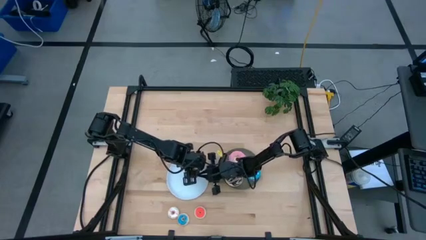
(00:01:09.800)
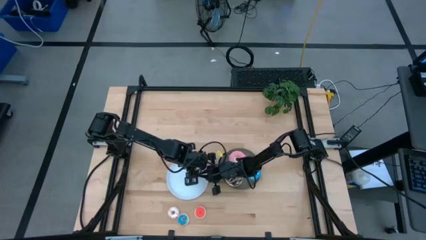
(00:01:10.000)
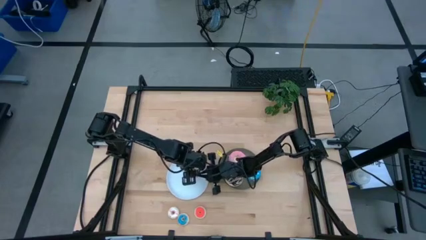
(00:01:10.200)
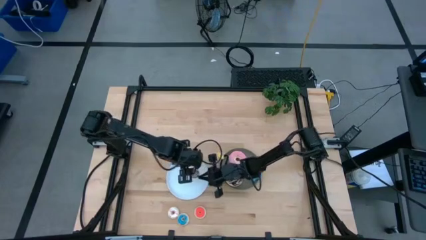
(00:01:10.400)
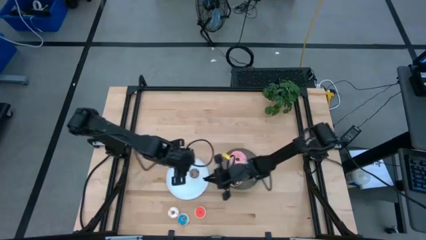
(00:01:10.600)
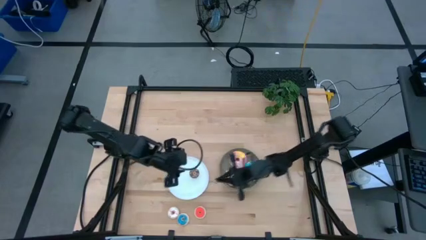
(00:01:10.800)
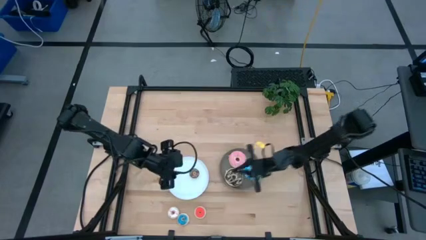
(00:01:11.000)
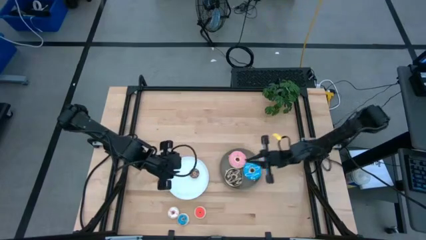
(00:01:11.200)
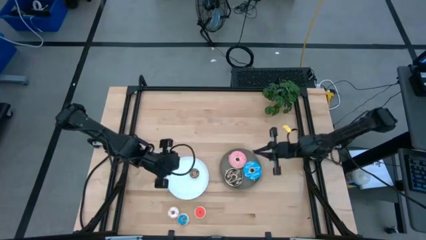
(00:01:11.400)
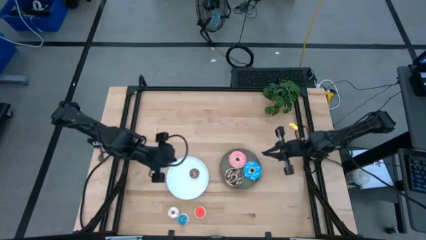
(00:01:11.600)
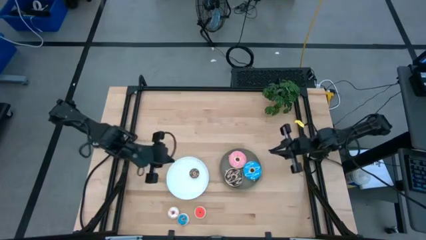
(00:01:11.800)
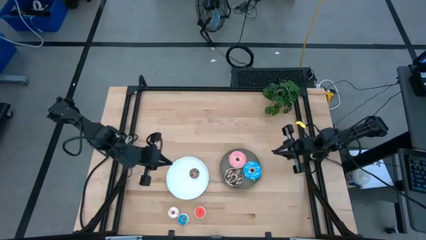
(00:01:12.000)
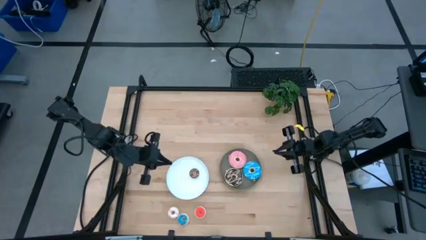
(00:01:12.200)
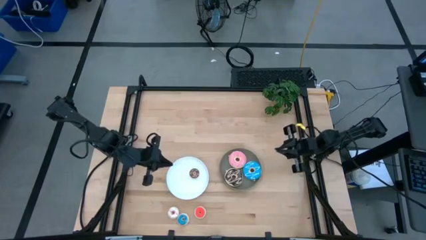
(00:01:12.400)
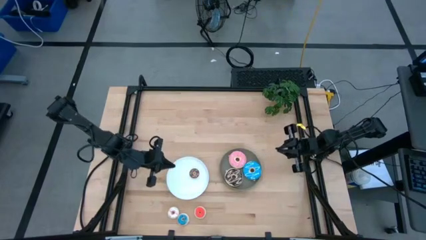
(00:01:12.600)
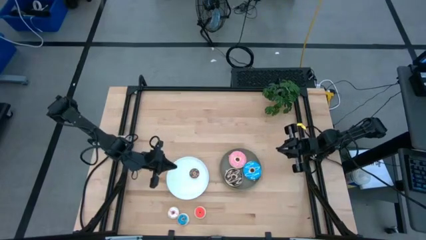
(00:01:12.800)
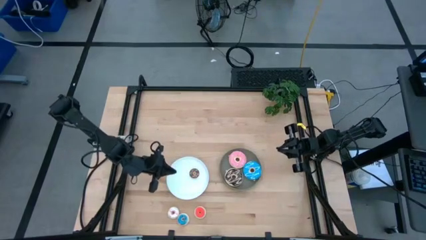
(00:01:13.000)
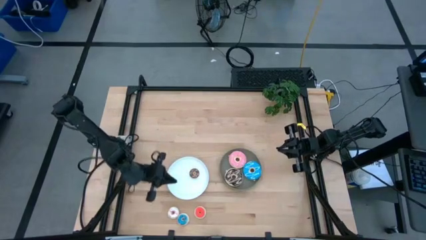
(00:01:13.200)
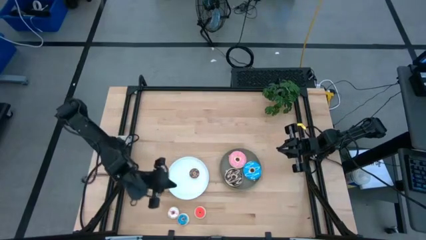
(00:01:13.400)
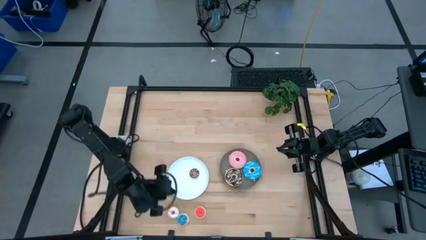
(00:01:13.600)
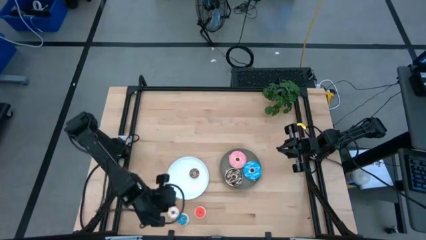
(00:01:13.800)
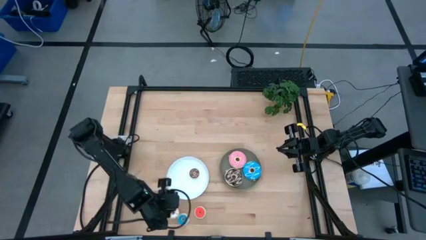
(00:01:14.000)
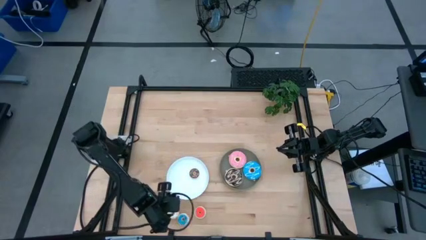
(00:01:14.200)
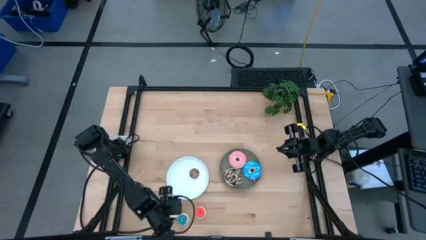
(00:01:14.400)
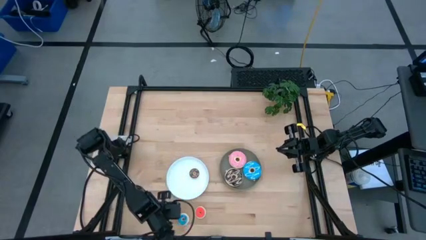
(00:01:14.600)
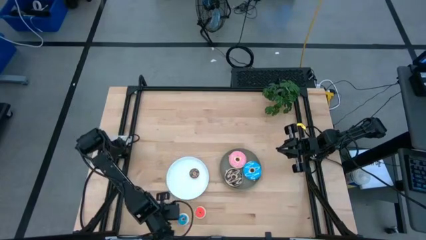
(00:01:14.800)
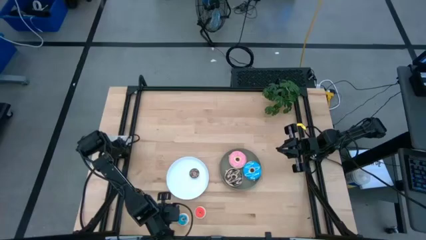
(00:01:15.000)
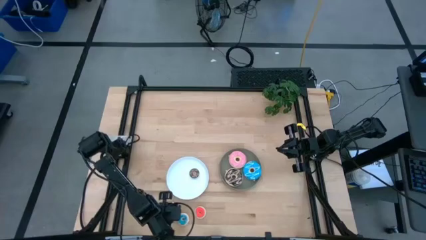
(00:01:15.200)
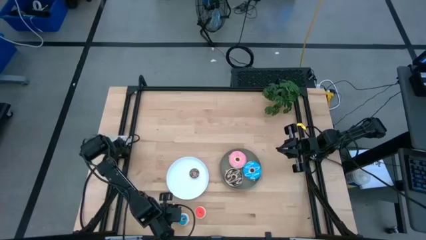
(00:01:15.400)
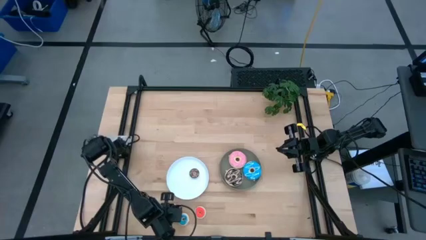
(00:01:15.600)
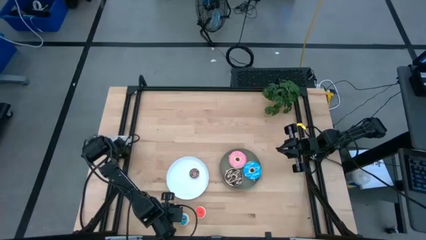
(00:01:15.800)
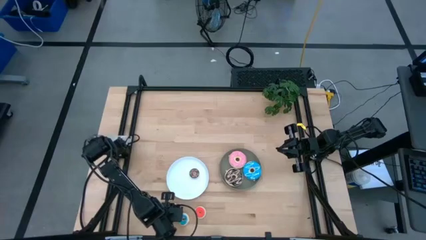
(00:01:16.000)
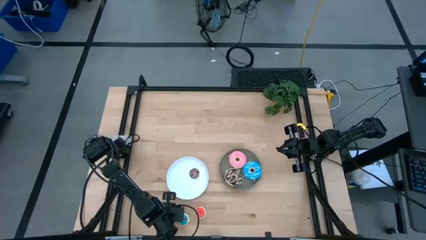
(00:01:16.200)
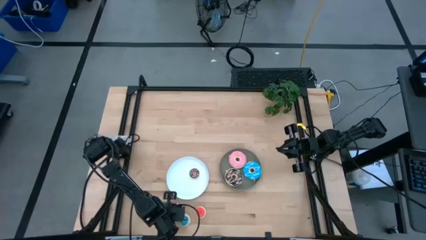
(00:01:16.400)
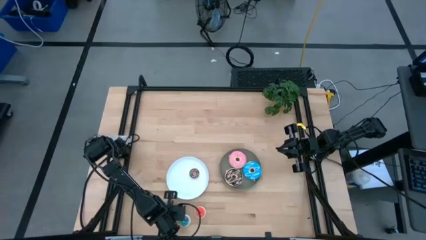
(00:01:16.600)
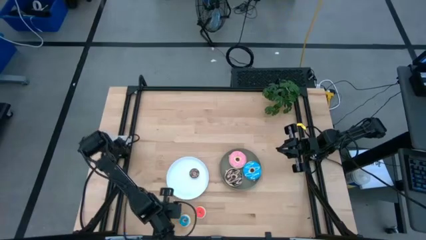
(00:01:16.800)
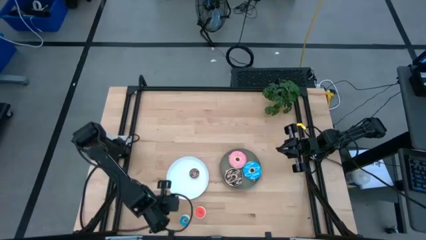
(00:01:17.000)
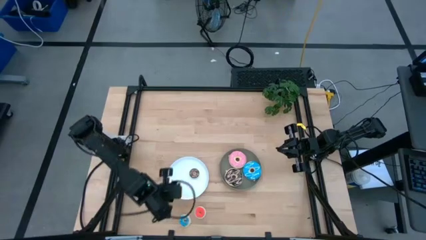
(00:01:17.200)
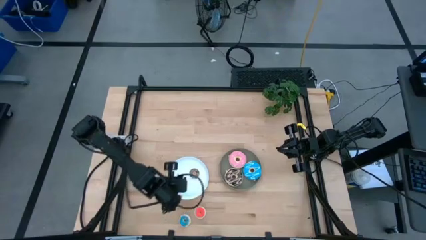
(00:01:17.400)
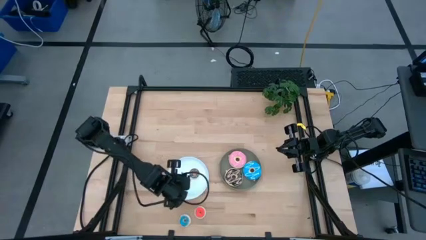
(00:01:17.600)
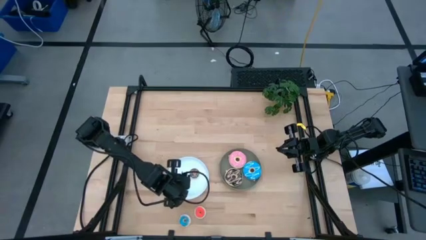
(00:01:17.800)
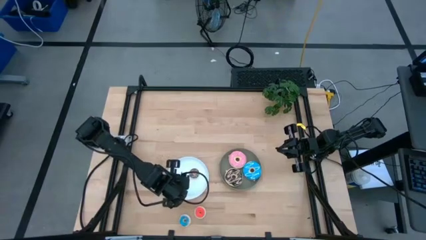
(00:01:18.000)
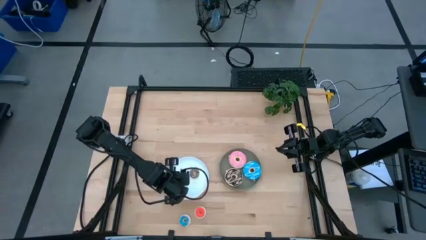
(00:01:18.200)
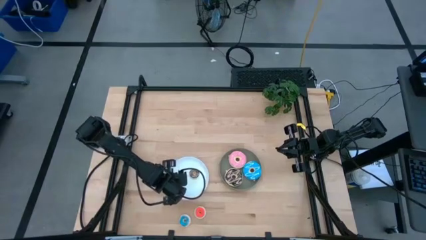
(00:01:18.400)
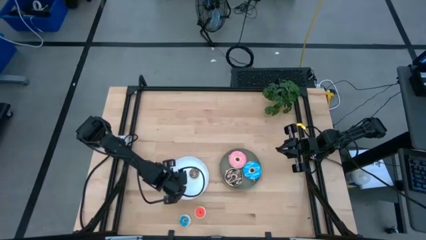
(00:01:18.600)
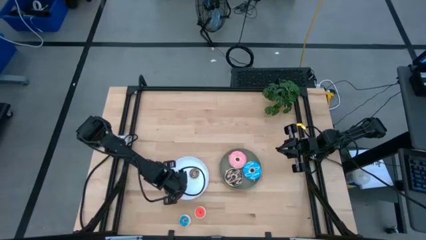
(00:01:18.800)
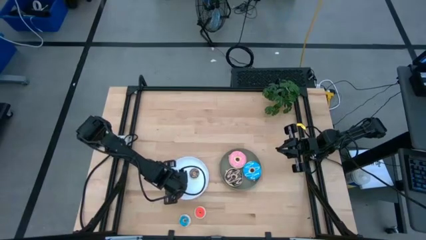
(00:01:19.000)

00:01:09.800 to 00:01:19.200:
Task: Pick & Place donuts
Put the small white donut on the white plate

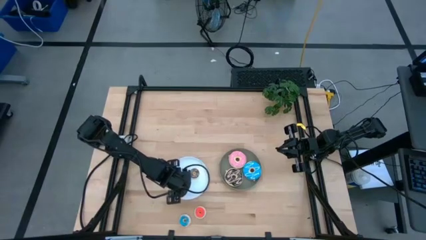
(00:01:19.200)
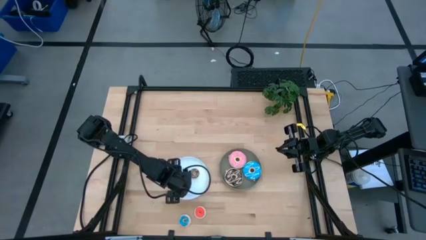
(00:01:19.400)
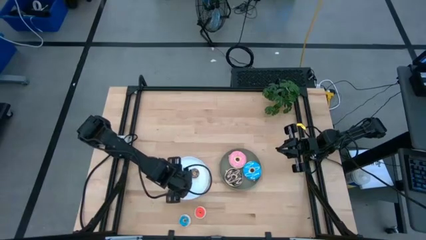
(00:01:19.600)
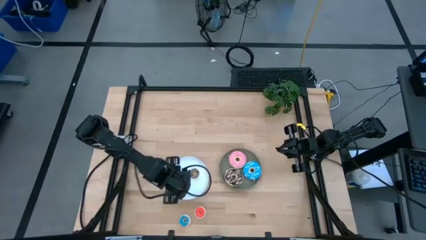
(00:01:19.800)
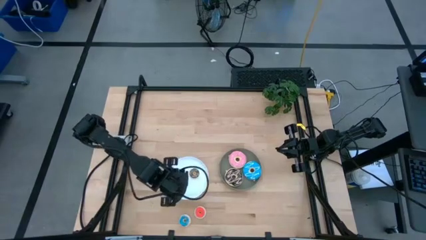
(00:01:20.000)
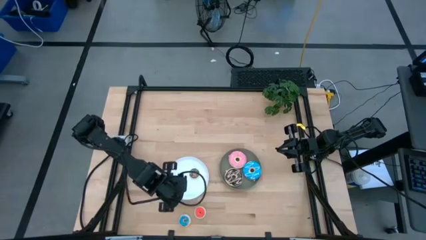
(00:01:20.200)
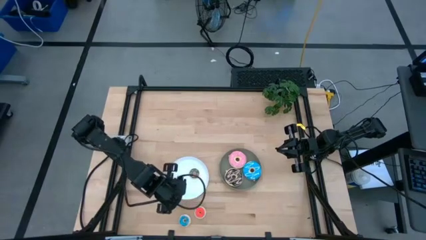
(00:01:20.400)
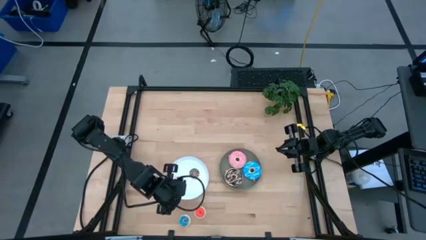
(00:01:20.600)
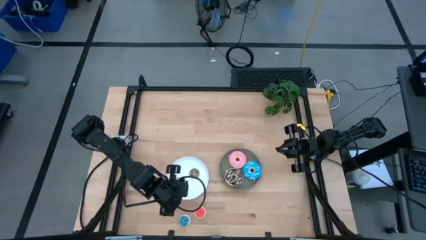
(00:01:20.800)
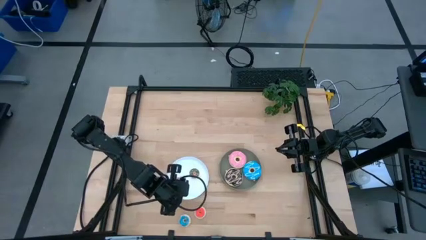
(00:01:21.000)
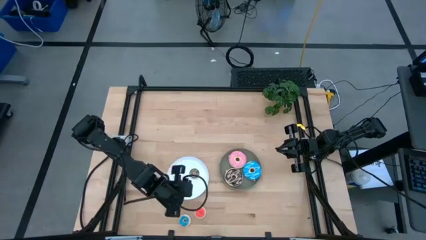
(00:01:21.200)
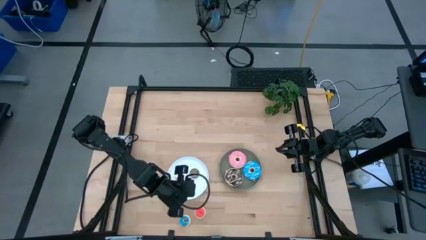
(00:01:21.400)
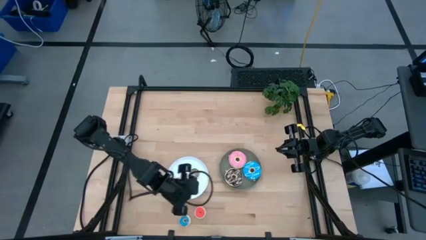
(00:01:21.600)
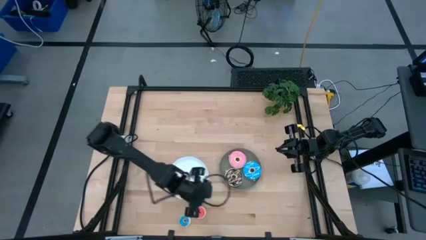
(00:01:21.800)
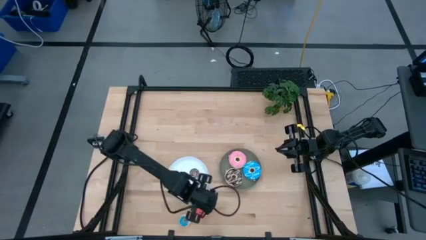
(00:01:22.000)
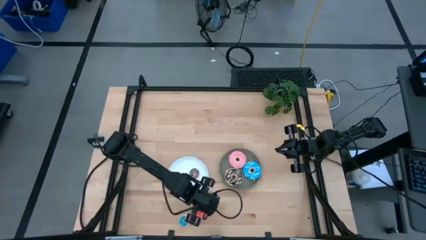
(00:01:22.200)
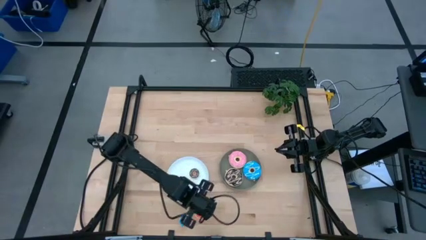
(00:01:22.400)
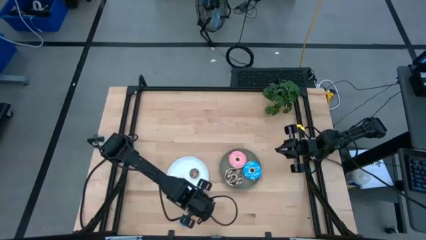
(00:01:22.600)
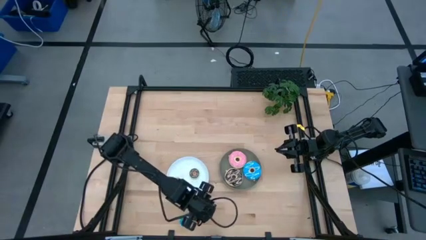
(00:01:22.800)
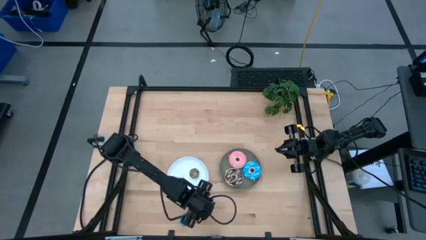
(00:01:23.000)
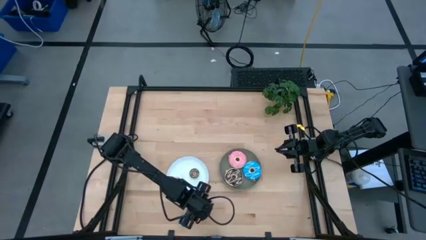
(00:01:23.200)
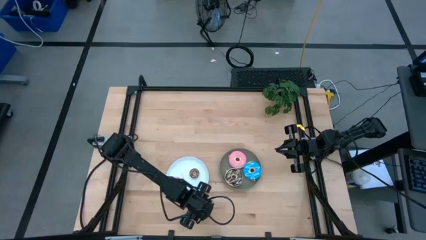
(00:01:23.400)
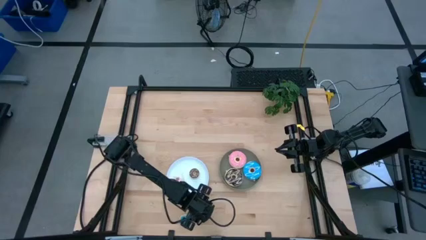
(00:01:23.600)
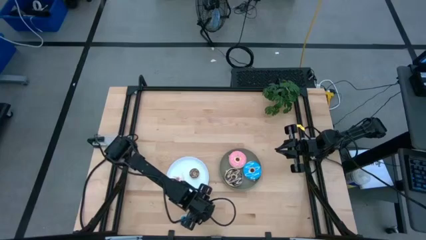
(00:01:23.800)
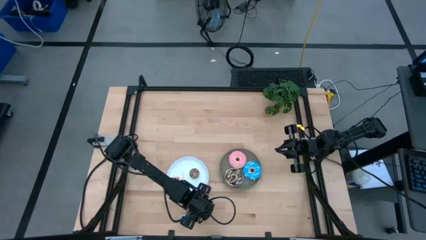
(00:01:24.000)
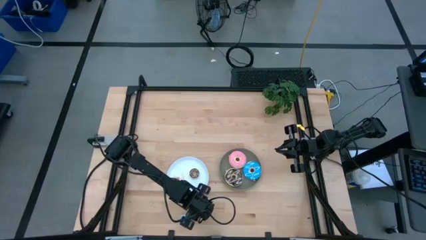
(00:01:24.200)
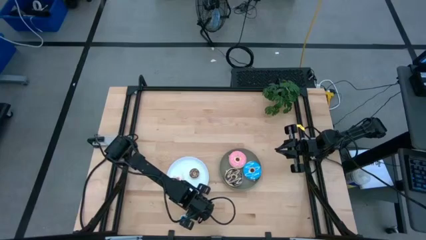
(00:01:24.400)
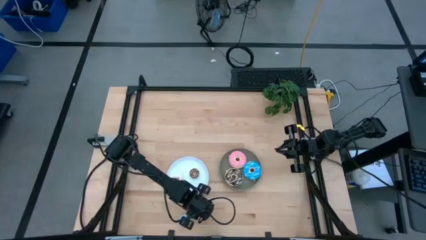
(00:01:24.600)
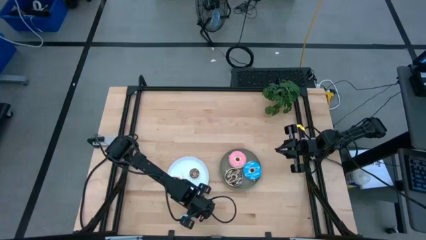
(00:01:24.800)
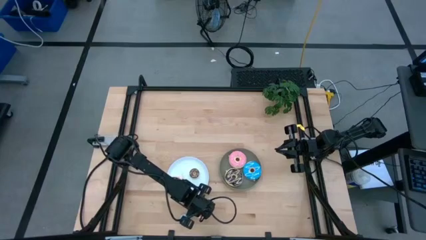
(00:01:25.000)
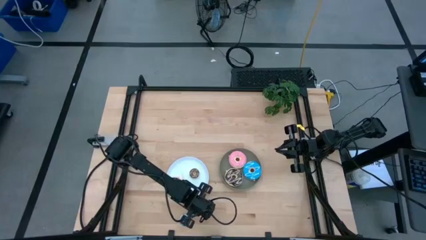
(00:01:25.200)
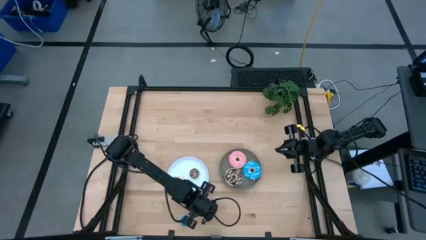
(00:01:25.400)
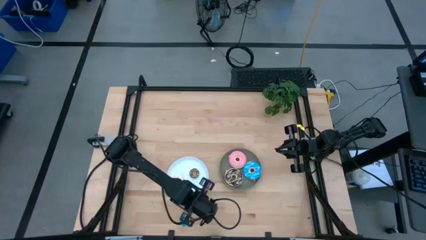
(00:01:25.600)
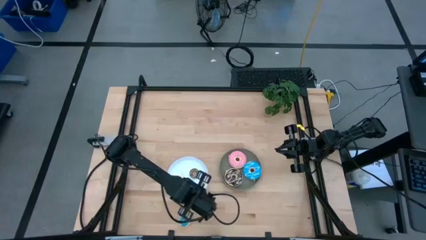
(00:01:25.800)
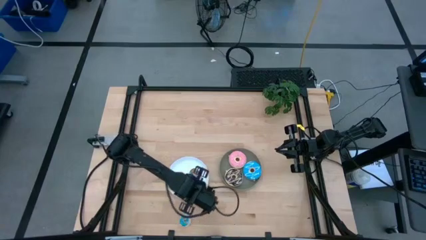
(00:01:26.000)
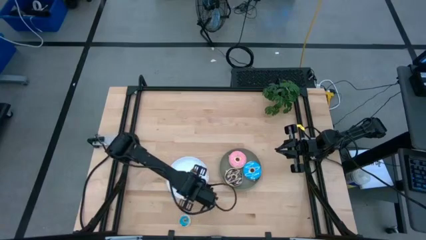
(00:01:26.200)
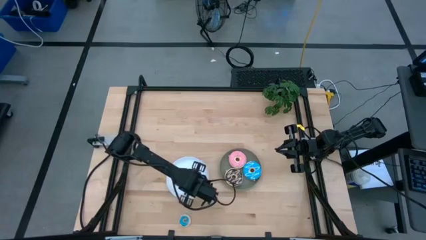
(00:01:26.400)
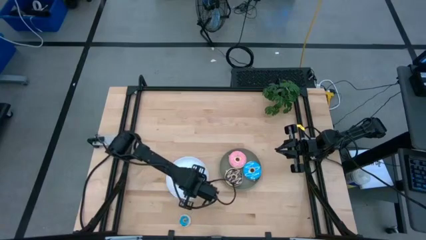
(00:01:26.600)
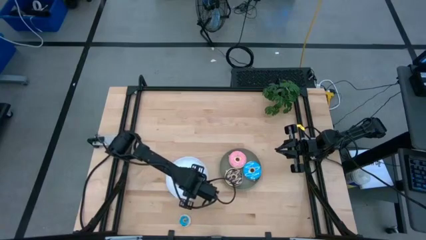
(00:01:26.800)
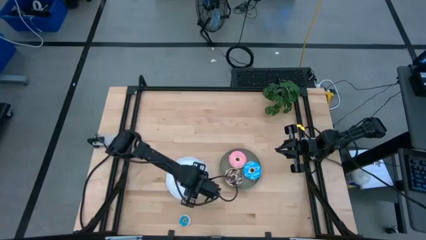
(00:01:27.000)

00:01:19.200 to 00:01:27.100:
Put the small orange donut on the white plate
